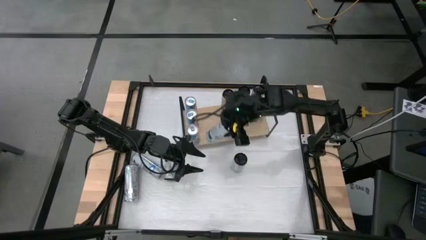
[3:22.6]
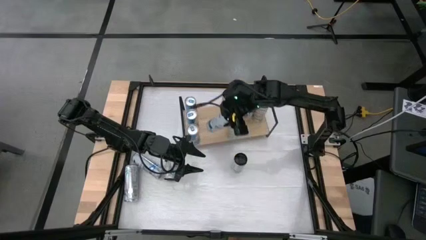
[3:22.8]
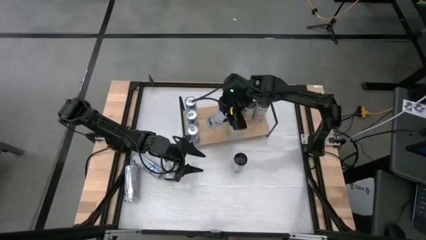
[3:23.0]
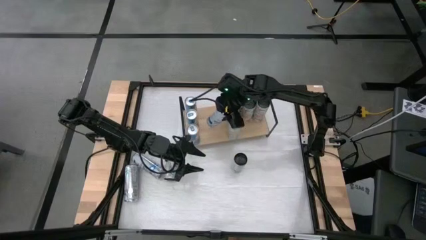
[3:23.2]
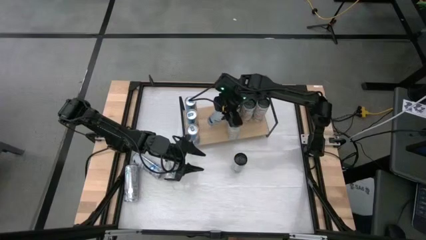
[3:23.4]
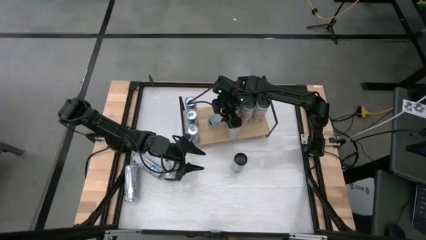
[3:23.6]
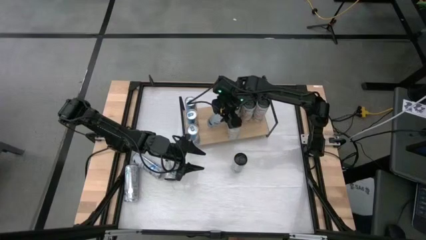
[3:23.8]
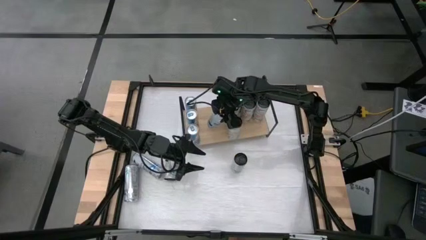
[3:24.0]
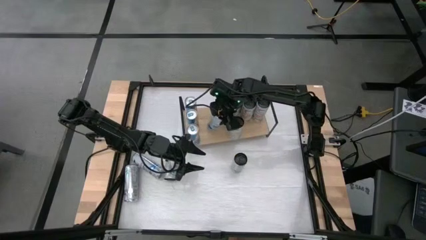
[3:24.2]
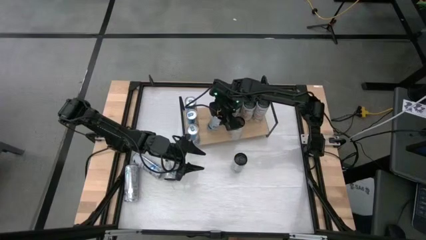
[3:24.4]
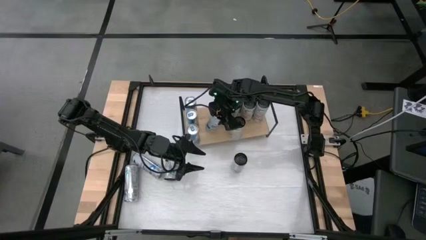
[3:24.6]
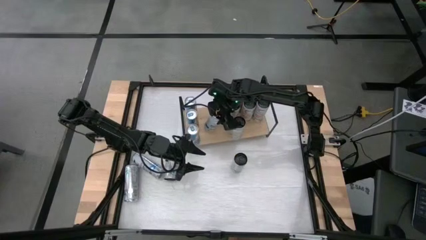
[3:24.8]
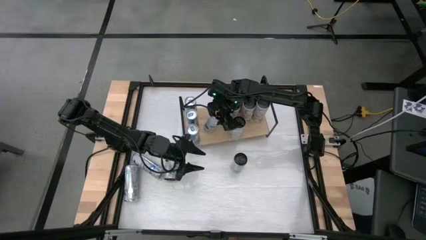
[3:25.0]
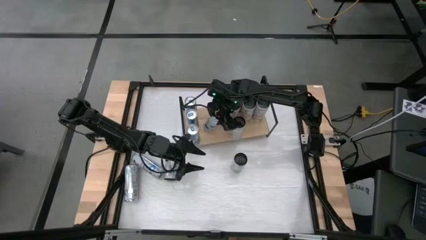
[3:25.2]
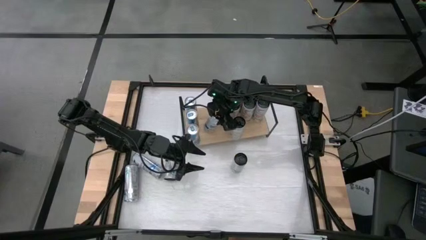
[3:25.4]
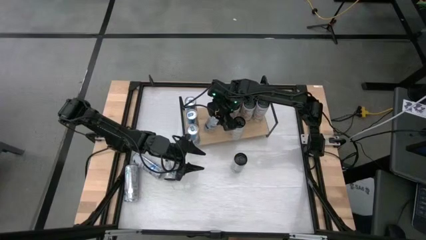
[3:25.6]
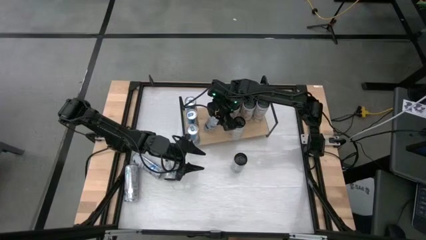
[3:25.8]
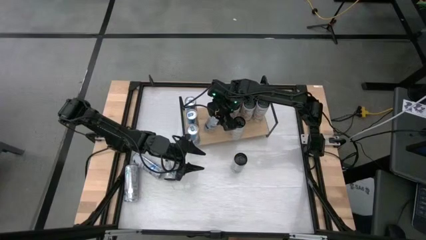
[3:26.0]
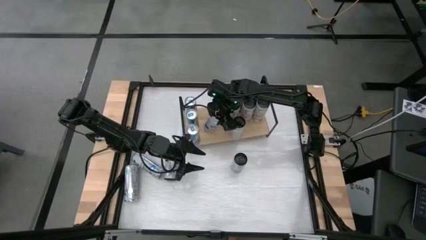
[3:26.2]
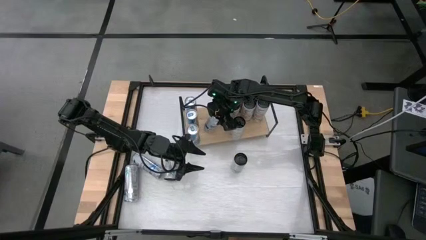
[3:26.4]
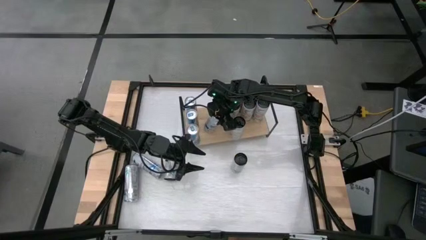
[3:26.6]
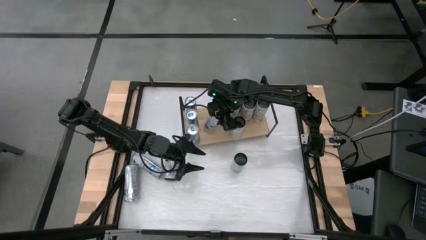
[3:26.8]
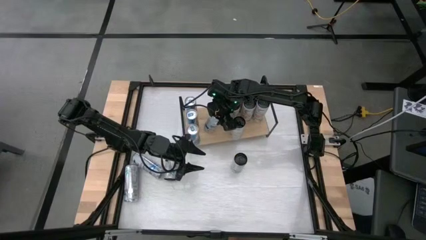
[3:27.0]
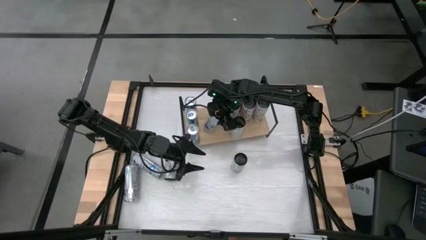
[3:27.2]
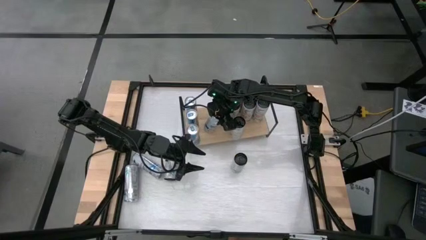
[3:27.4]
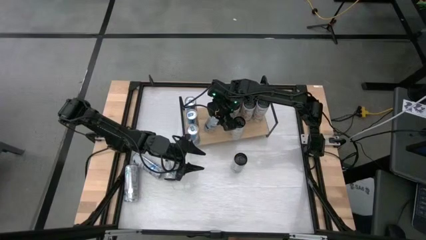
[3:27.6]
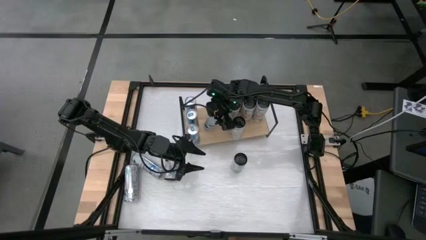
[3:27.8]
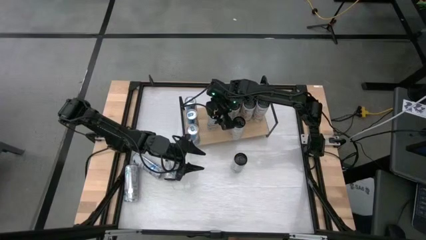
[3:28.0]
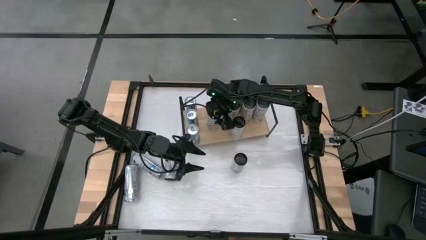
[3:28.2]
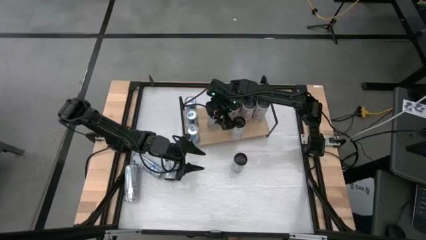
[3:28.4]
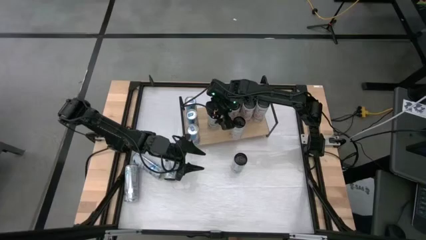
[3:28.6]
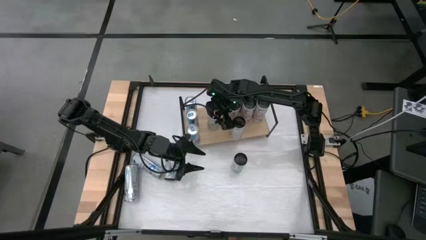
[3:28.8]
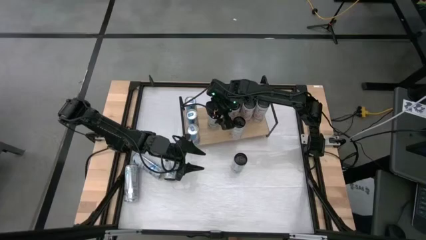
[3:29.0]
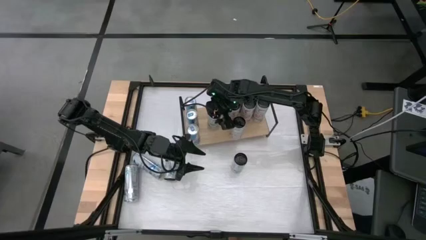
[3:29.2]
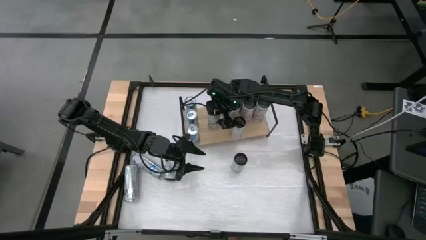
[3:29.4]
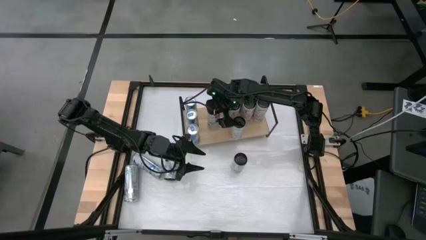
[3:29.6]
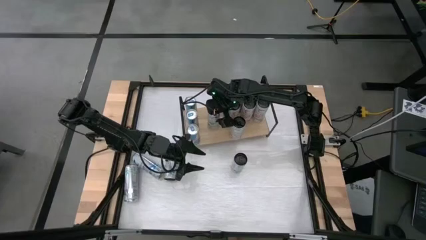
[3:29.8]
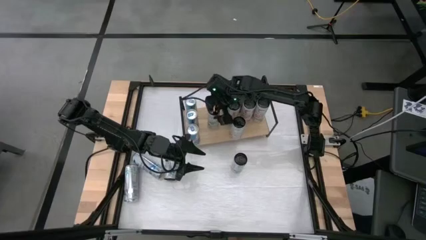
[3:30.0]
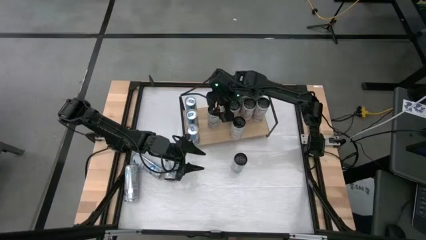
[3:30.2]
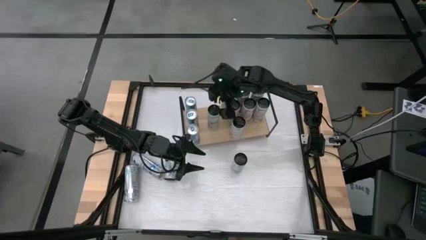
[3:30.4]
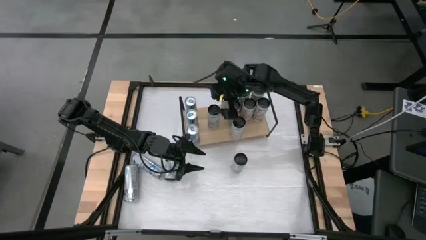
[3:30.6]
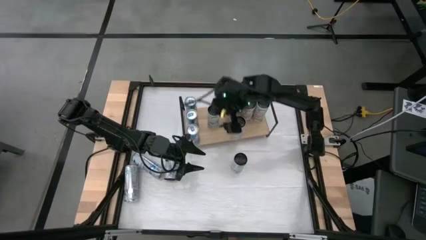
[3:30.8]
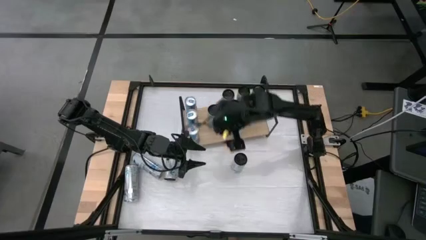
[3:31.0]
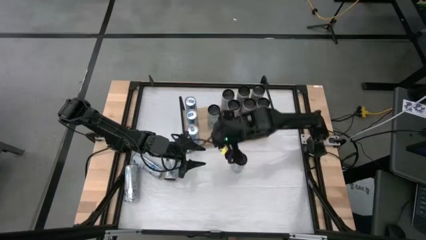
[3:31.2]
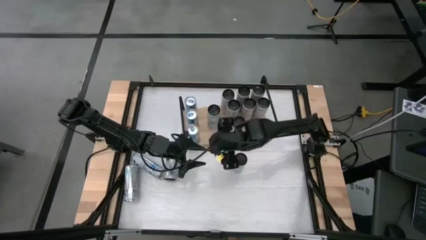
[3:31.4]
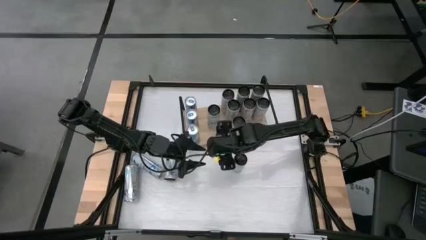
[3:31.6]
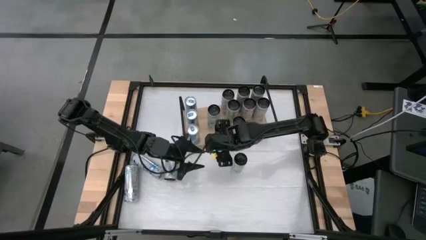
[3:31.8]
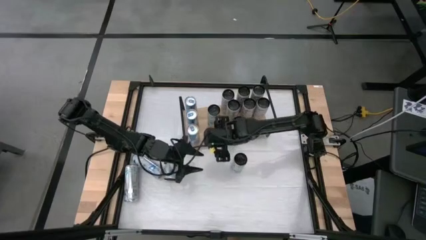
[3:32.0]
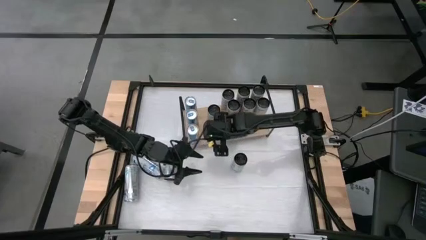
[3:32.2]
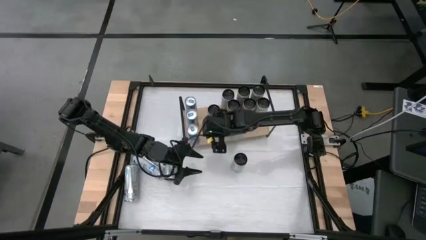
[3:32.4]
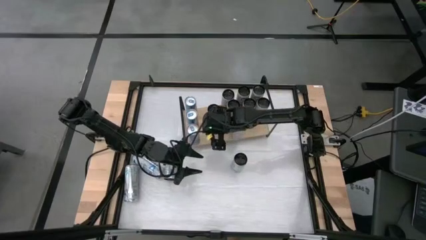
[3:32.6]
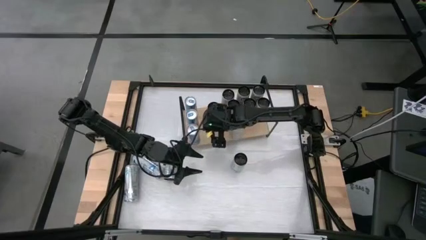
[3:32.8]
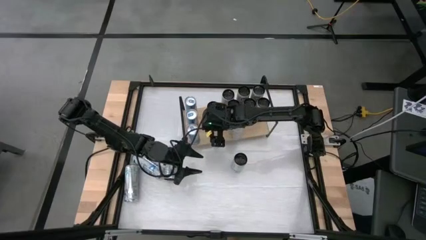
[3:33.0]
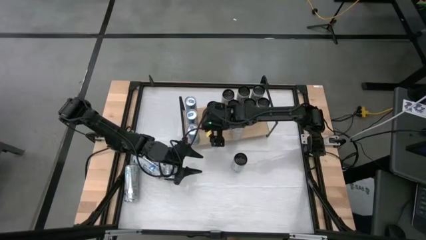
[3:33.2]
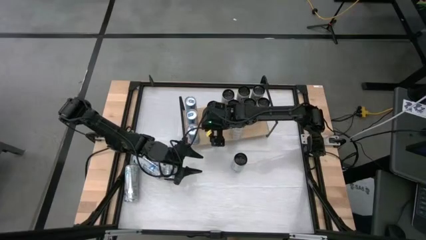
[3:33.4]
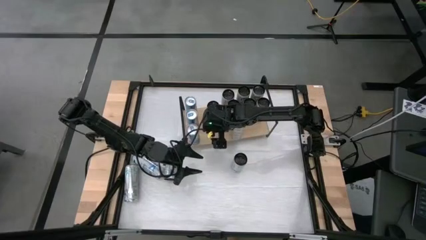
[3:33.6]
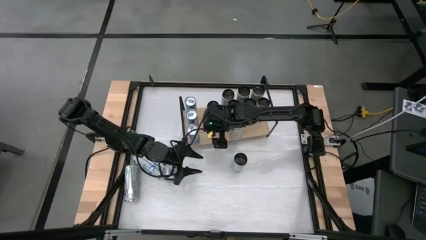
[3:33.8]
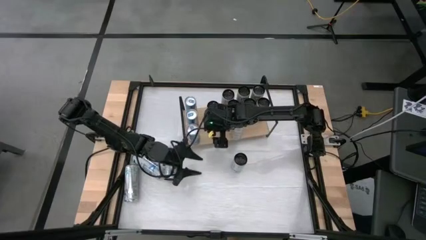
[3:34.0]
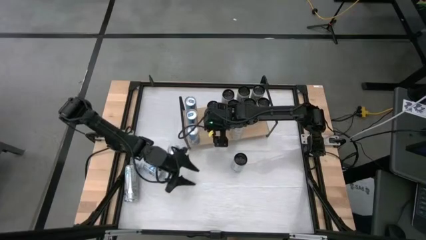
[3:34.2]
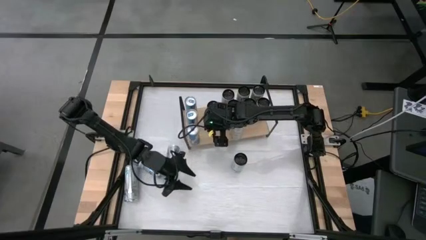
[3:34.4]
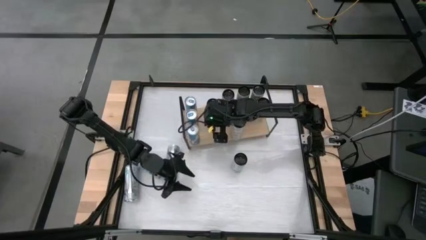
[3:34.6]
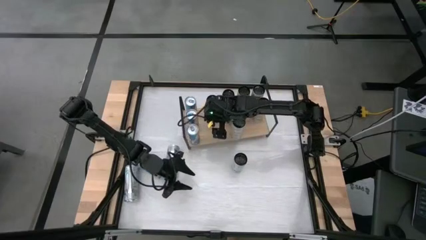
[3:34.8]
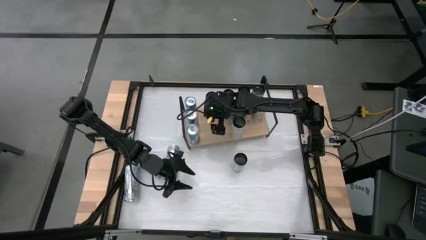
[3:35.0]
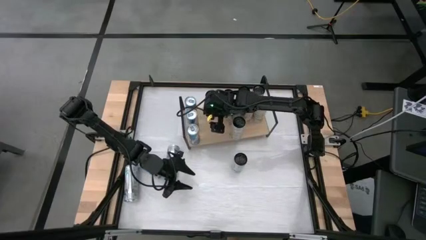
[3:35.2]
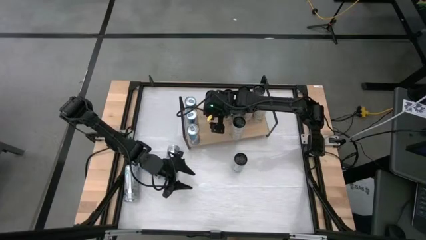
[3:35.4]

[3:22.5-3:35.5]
Task: Place canned beverage on shelf
Put the white-blue soda can on the shelf

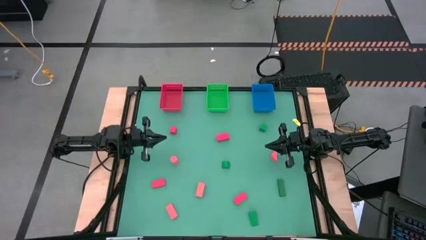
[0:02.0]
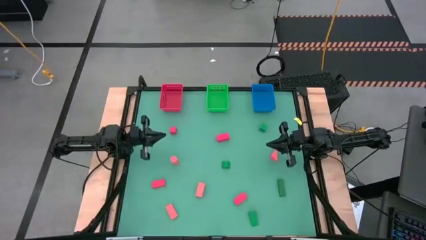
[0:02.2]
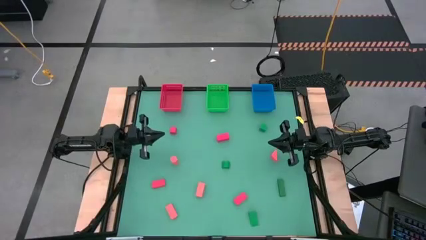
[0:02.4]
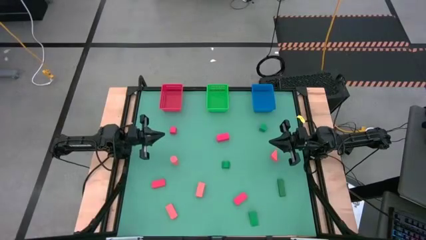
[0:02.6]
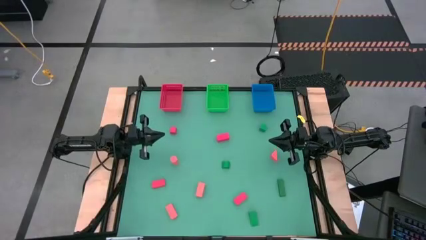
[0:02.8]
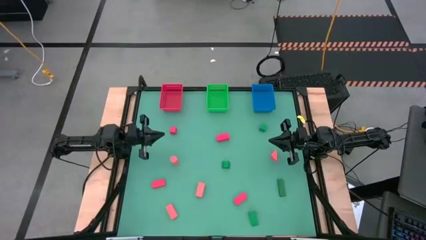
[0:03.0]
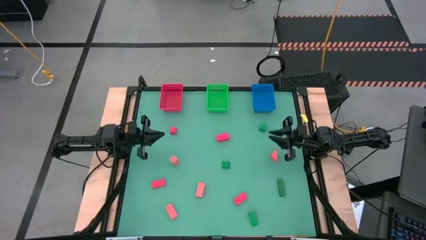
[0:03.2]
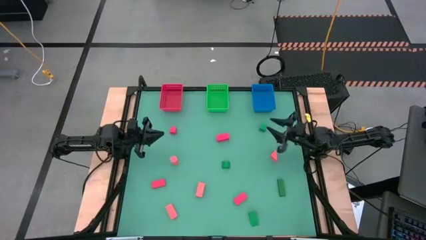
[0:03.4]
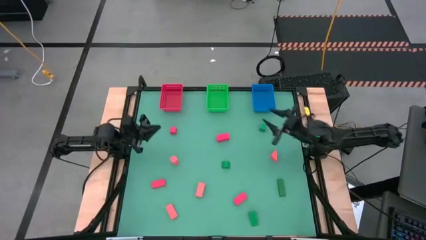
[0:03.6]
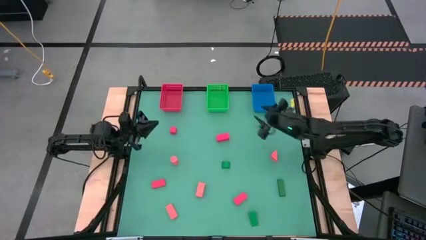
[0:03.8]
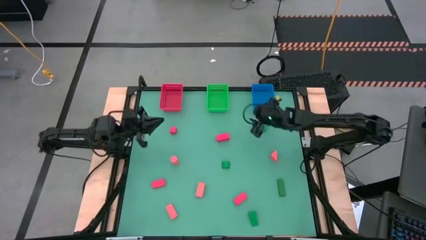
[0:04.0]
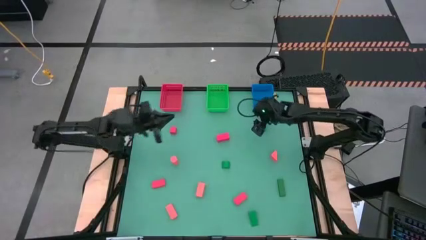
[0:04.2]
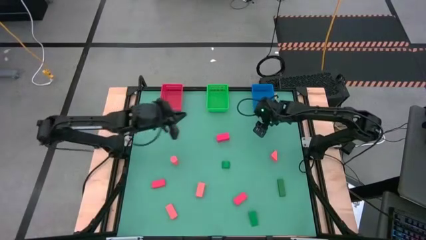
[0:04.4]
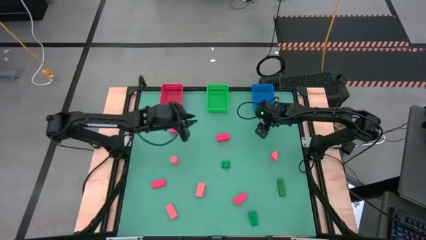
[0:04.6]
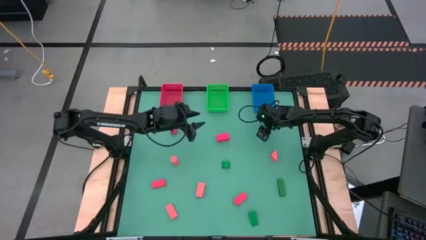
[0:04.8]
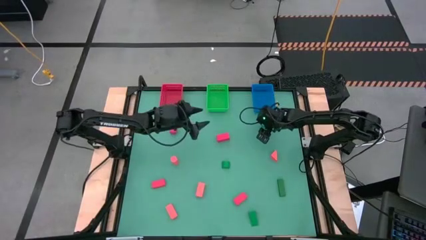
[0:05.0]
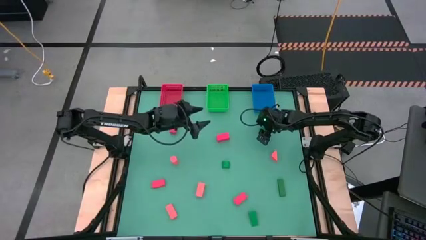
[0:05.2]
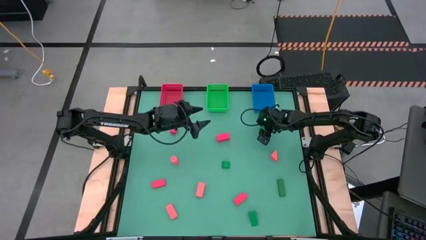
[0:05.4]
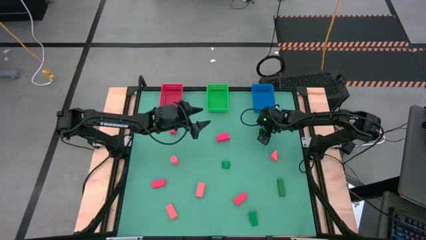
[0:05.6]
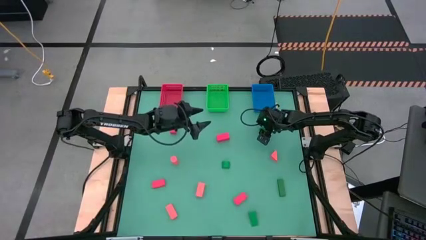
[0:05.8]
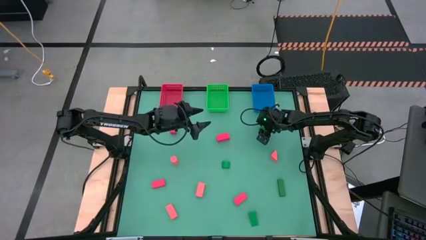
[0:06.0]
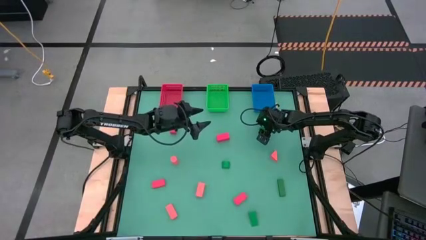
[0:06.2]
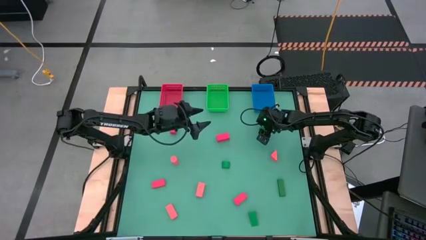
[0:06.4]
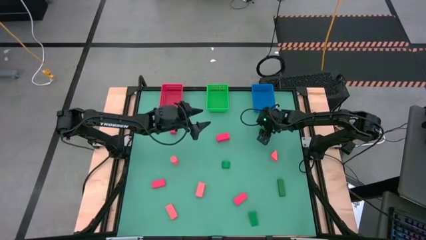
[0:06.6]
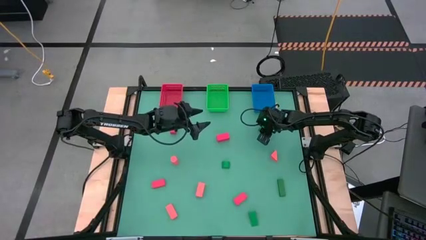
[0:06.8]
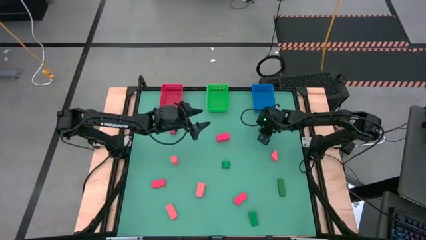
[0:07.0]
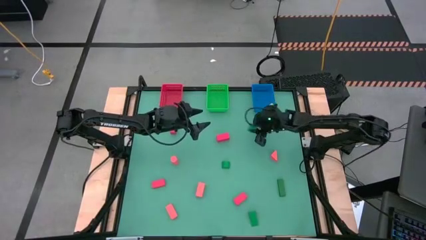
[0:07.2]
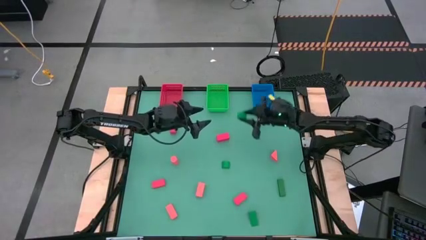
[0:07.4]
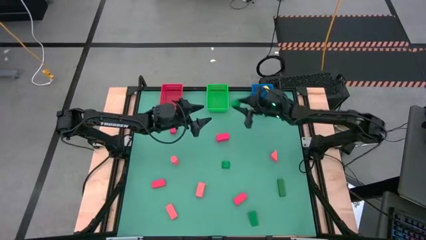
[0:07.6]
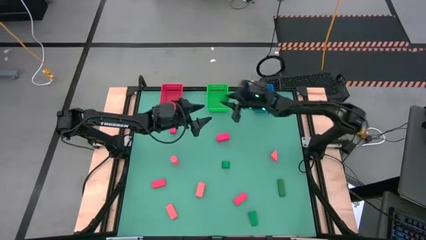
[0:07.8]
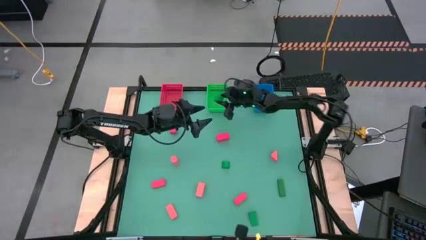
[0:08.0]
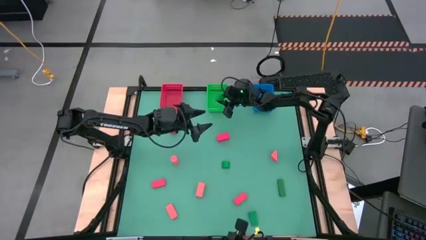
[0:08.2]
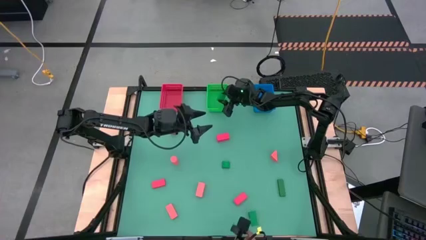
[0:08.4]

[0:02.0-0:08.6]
Task: Sort & place blocks by color
Put the green block into the green basket
